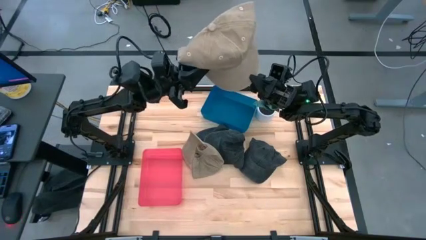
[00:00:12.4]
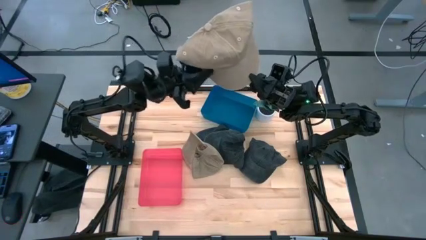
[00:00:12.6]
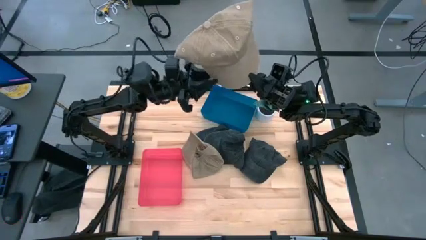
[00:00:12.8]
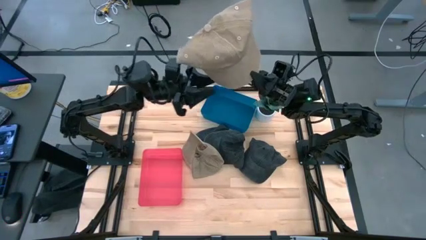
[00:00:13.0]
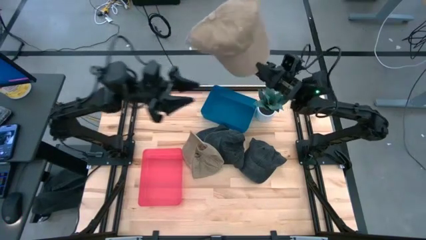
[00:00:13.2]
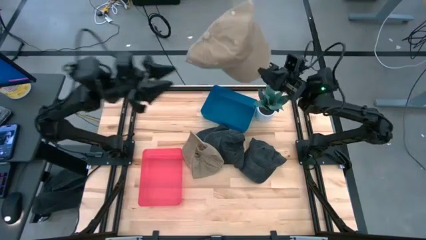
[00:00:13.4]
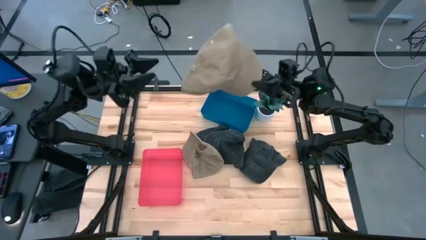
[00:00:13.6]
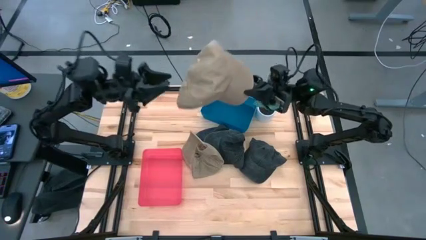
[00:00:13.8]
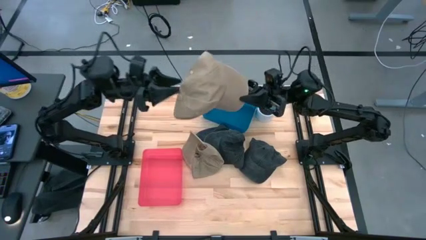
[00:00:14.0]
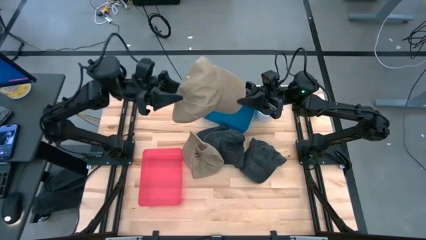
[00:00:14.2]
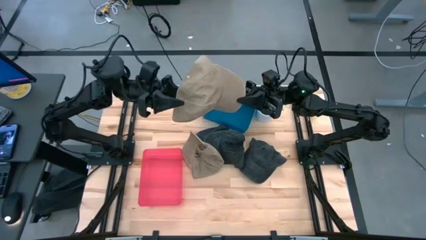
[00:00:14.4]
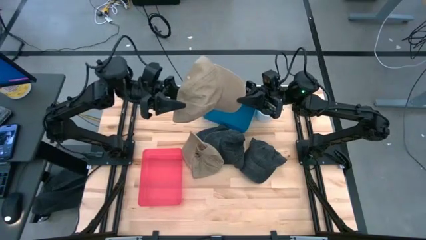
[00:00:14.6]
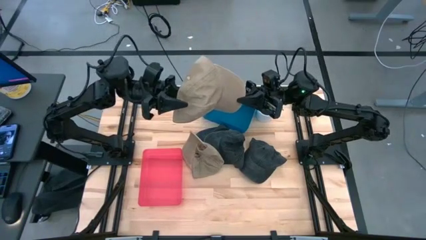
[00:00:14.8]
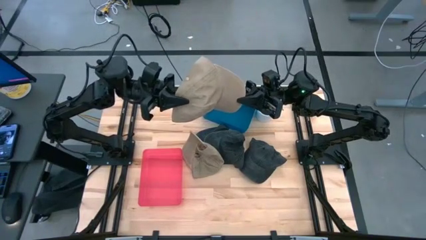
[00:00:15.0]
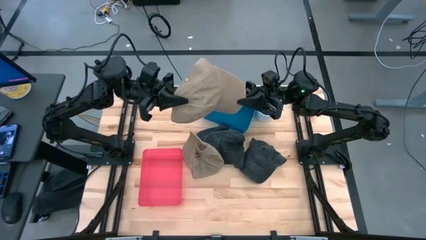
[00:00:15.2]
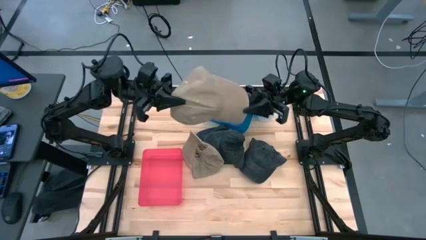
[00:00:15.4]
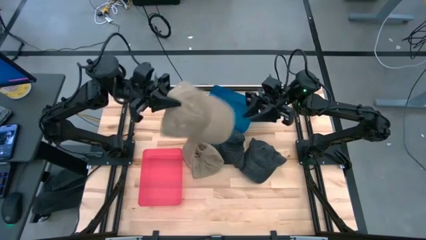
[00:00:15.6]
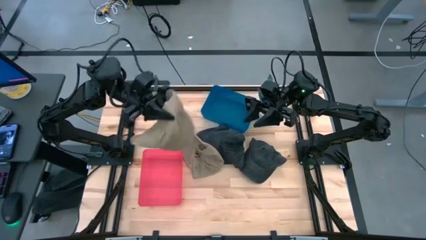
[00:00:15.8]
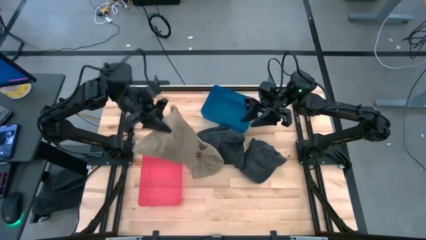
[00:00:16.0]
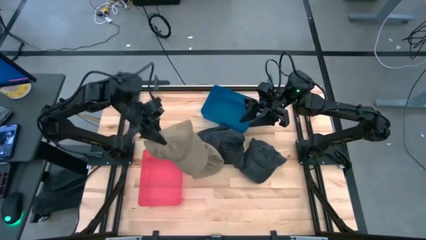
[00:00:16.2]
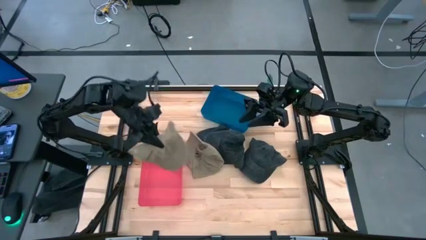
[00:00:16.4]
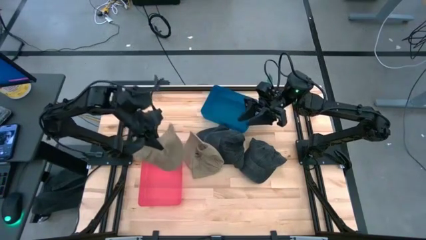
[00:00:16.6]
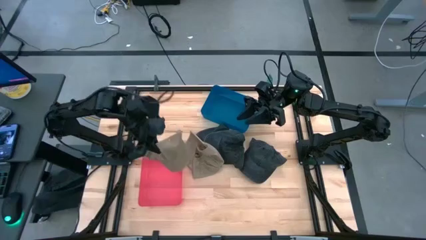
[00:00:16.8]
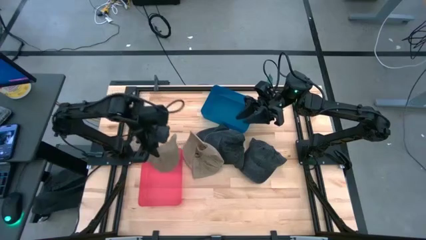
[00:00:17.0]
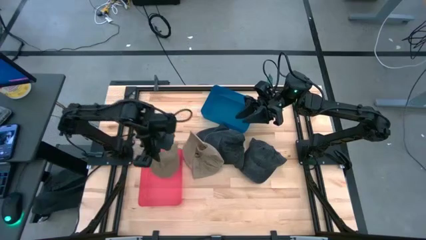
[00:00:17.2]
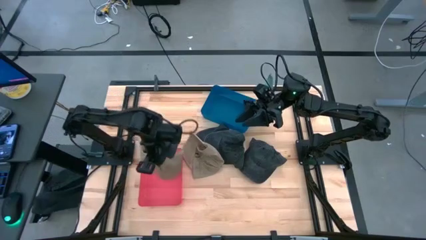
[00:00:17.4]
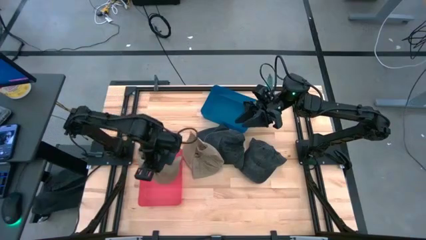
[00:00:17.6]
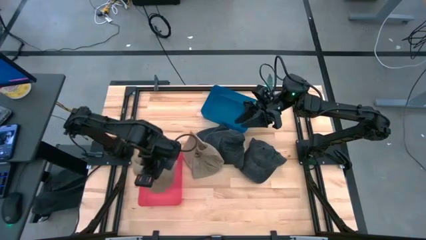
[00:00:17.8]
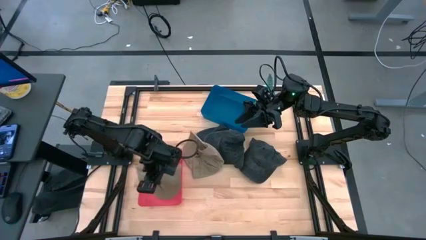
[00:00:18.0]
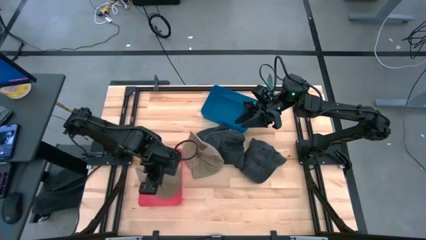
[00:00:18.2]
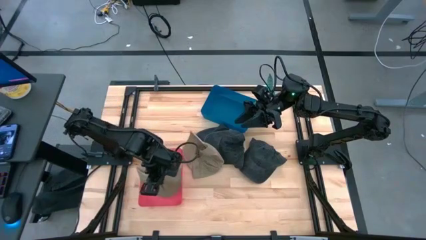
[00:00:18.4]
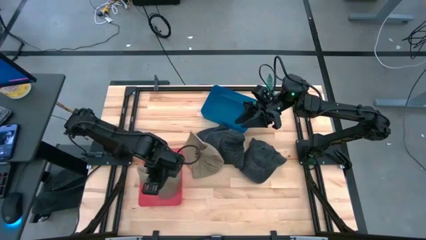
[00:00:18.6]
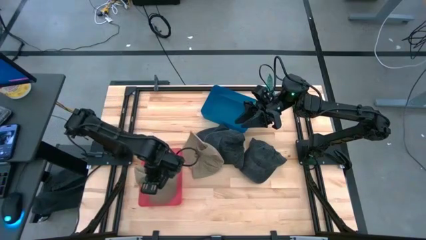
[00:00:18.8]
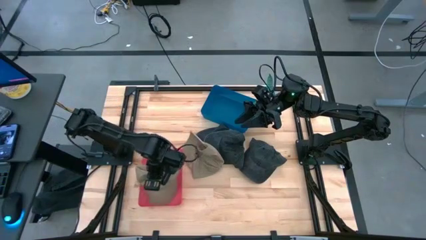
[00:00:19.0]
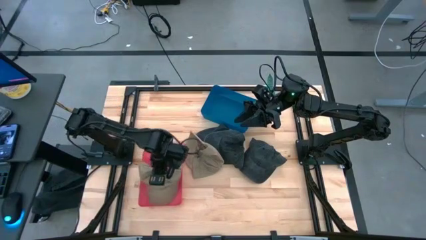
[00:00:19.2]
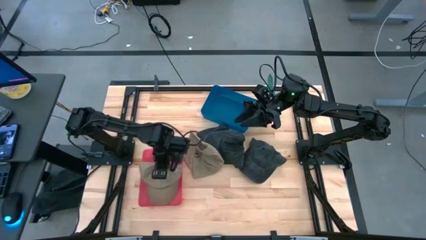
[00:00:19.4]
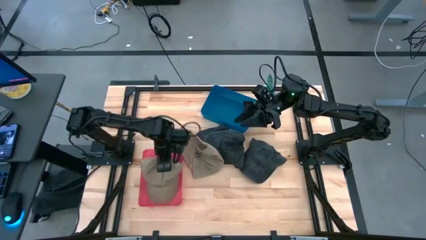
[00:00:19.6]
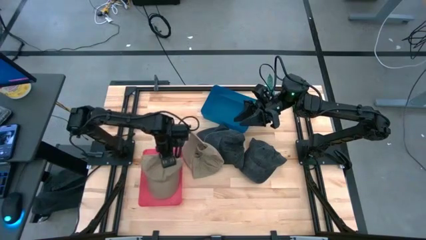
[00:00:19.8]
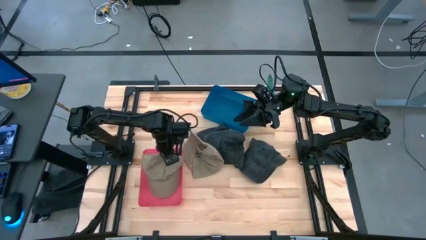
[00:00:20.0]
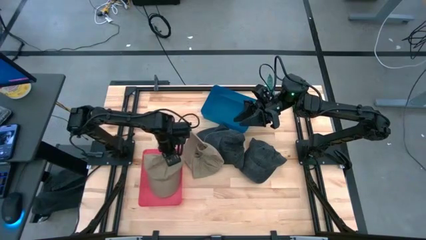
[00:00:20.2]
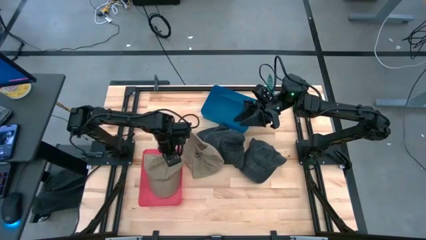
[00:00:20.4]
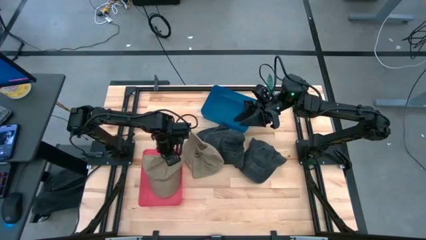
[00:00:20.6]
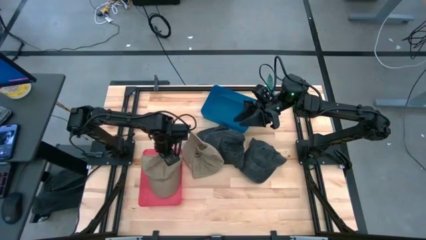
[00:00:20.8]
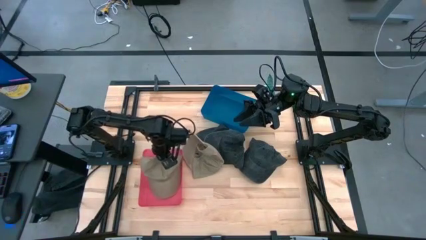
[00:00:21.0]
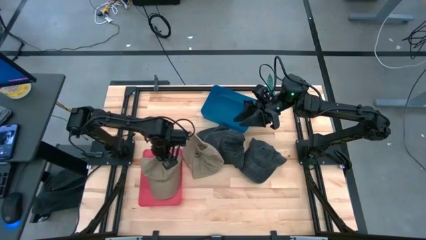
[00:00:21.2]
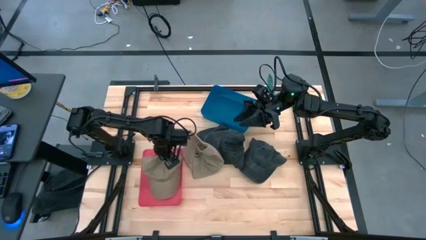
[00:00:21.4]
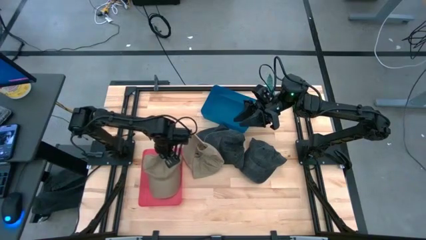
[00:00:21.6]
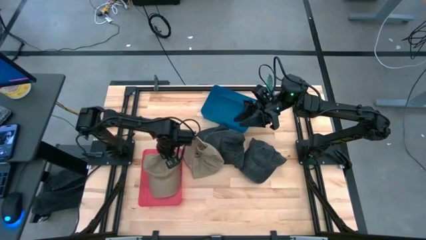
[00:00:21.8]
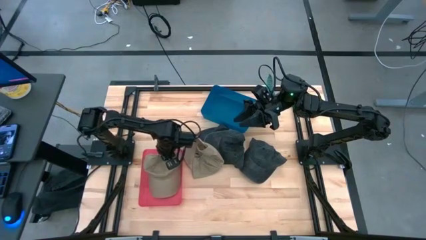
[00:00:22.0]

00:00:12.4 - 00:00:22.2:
Task: Pick & Place hat
Put the left brown cap into the red bin

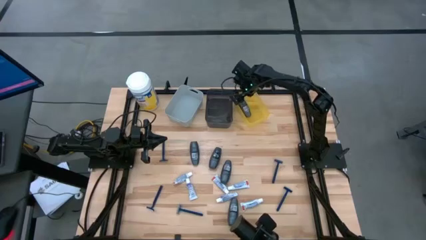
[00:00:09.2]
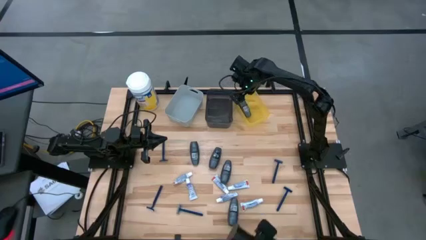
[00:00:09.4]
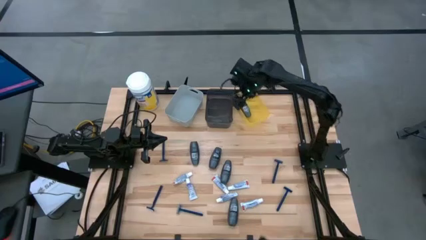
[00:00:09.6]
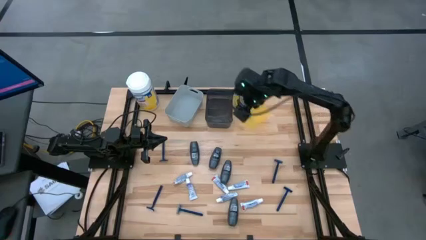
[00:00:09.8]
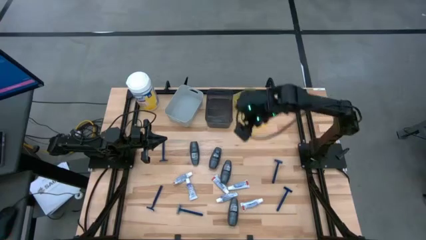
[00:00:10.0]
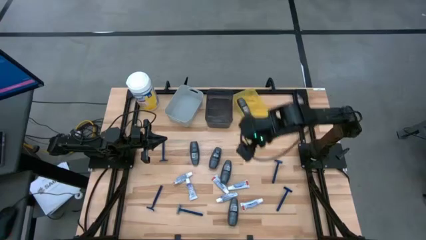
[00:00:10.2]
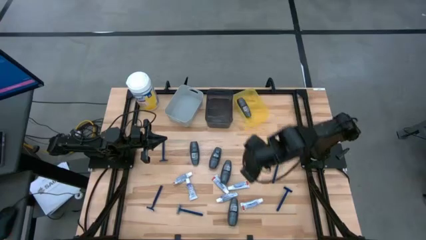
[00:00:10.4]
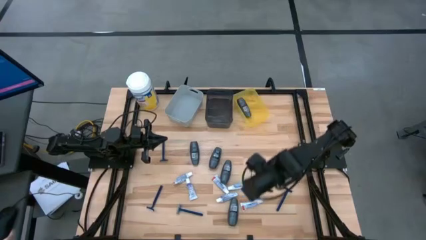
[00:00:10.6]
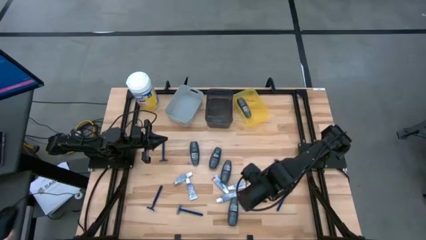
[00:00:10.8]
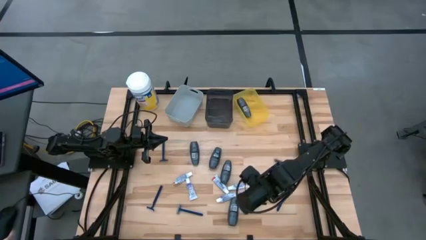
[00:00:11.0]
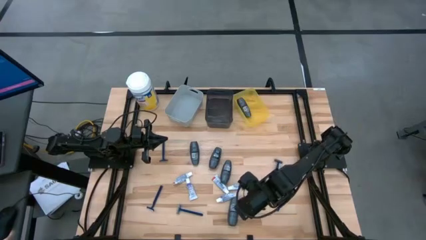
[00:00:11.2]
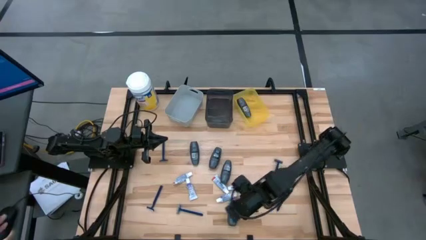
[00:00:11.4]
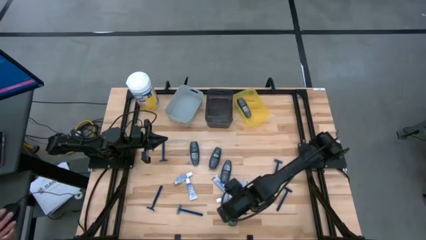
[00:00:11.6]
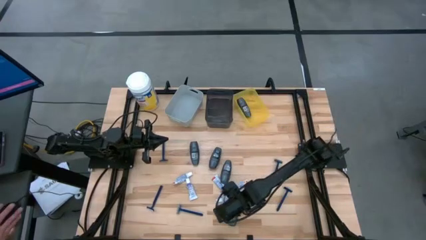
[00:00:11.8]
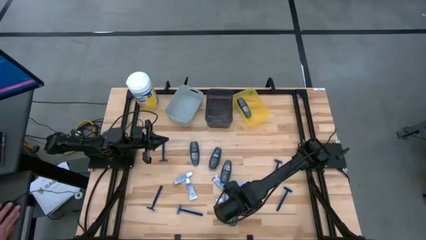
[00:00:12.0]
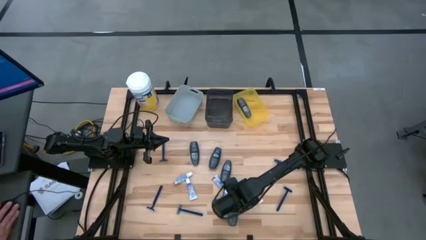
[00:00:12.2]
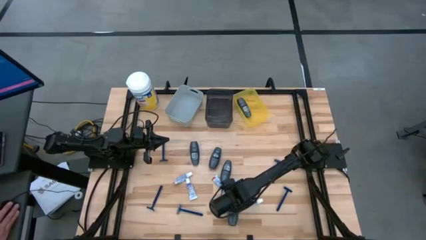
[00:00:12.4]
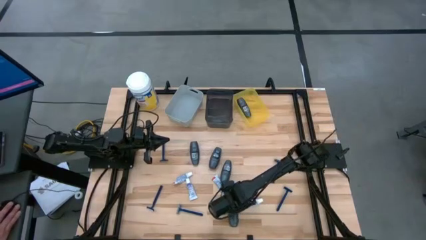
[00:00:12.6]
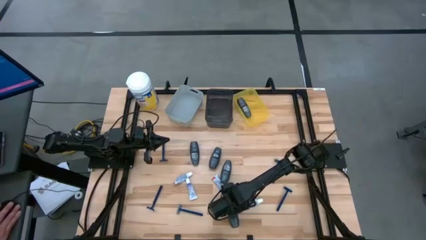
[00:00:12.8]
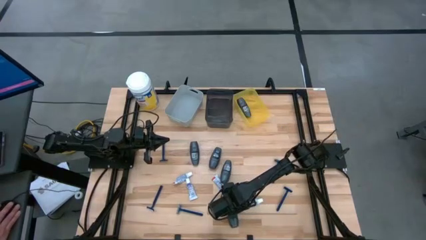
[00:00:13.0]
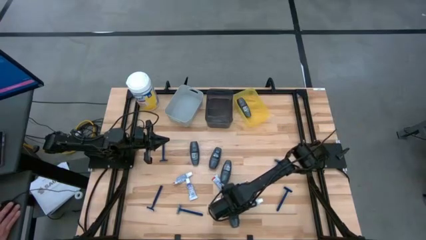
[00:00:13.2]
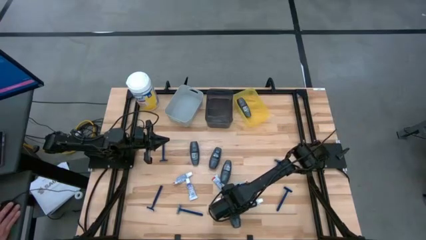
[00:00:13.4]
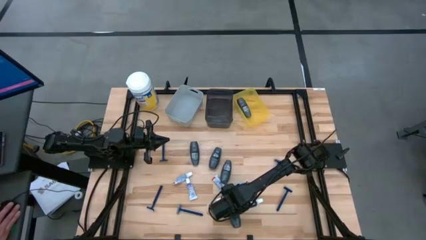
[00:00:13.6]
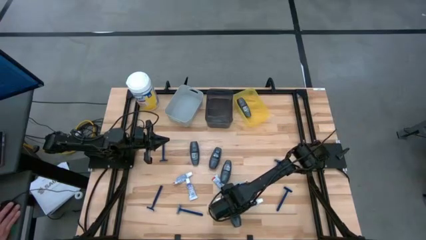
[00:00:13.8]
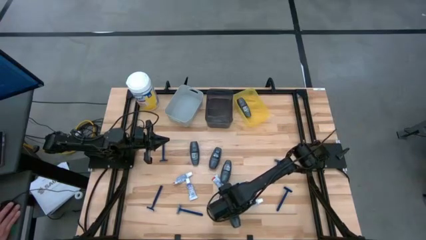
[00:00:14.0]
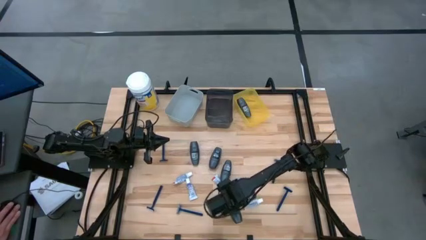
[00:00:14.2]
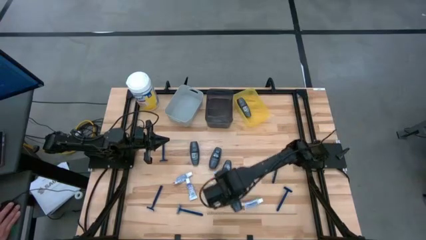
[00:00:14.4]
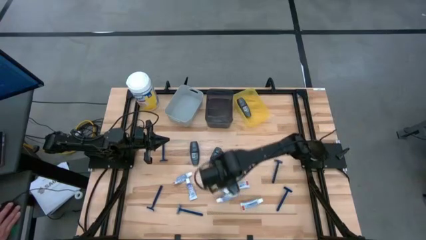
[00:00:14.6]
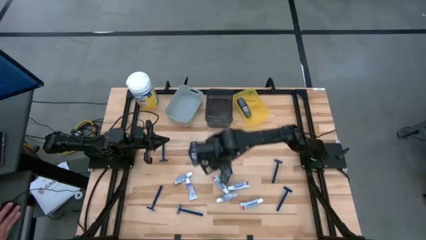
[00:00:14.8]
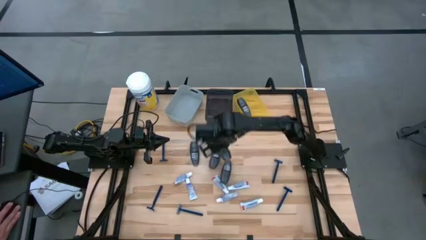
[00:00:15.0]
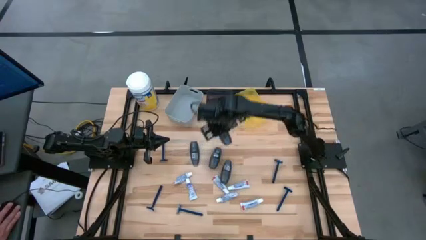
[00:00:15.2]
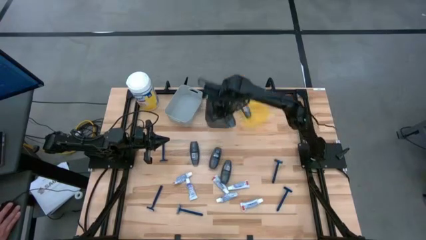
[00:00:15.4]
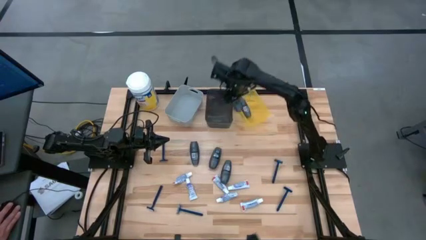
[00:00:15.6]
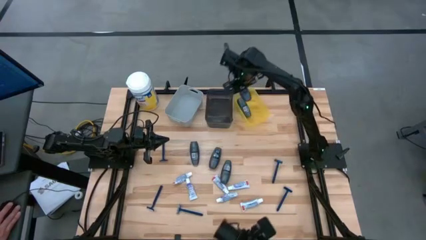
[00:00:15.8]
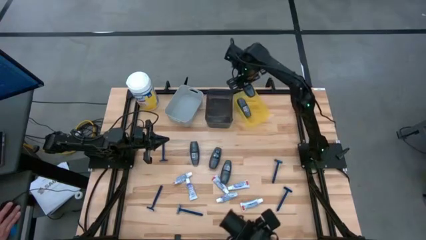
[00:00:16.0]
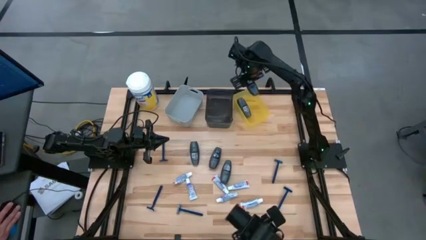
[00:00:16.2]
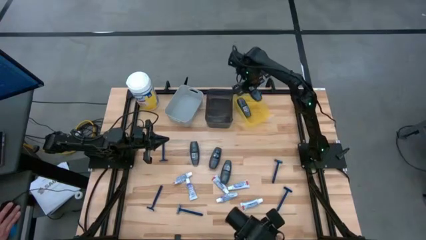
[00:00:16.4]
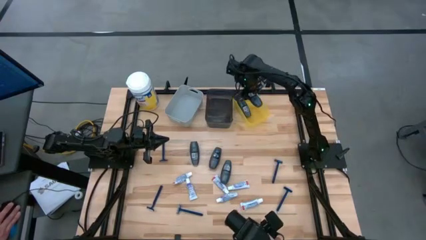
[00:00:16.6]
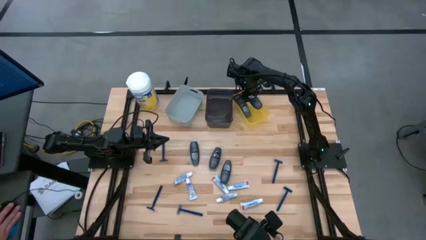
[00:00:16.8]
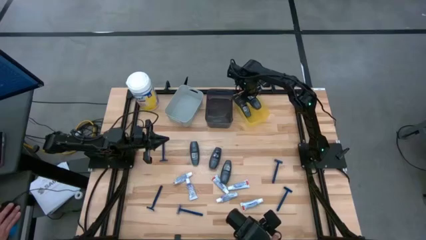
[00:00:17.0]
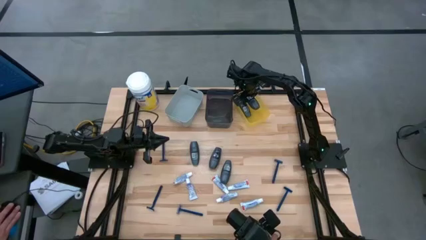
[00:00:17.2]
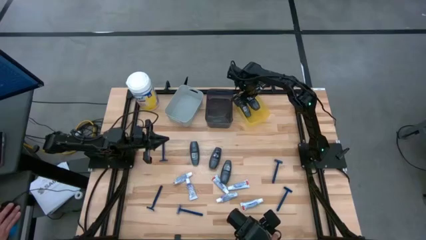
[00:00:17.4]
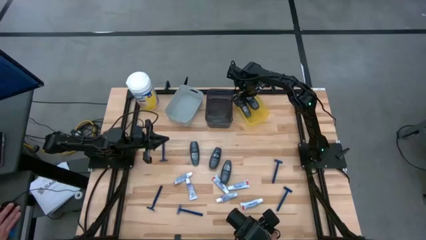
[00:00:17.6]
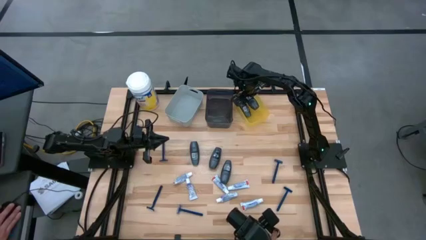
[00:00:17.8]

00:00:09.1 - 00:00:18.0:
Task: Pick & Place Travel size toiletries
Put the deodorant into the yellow bin
